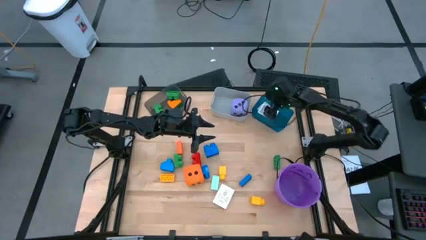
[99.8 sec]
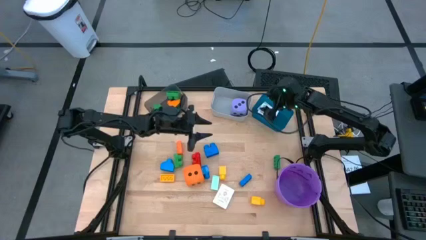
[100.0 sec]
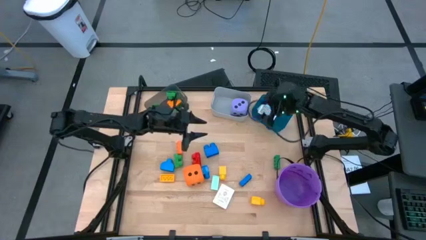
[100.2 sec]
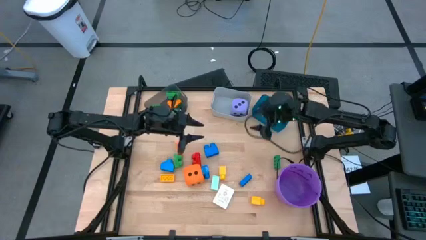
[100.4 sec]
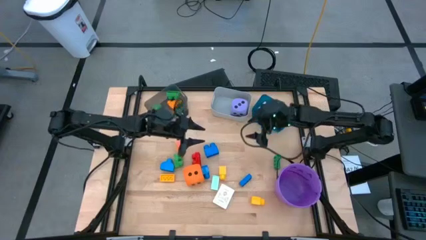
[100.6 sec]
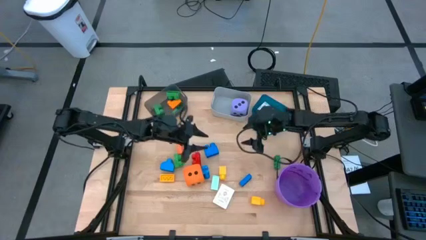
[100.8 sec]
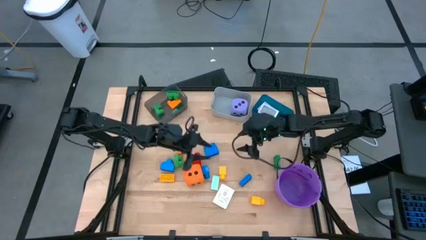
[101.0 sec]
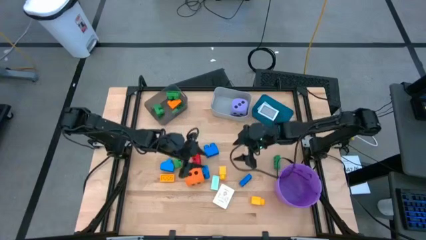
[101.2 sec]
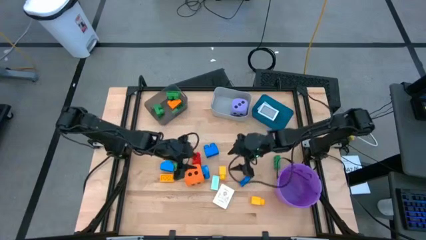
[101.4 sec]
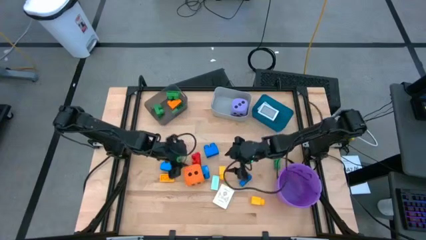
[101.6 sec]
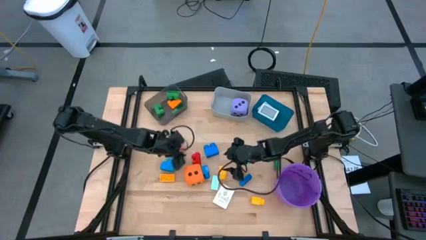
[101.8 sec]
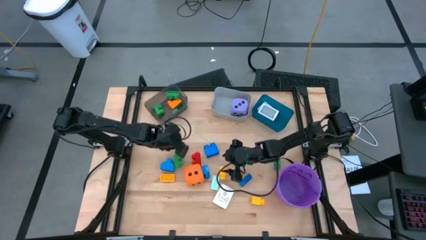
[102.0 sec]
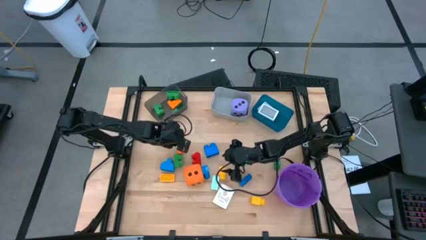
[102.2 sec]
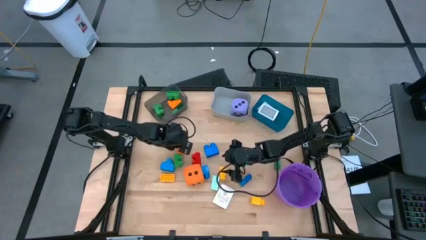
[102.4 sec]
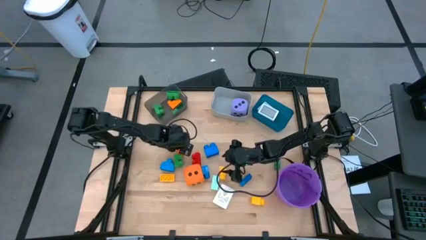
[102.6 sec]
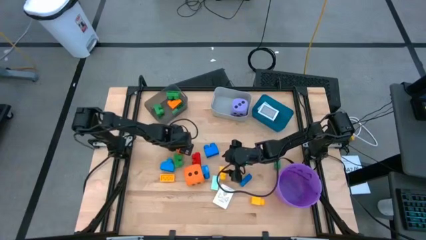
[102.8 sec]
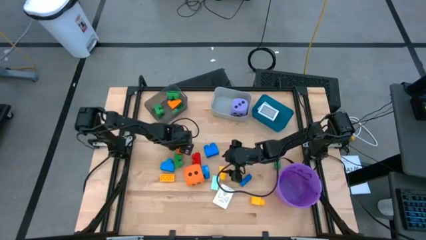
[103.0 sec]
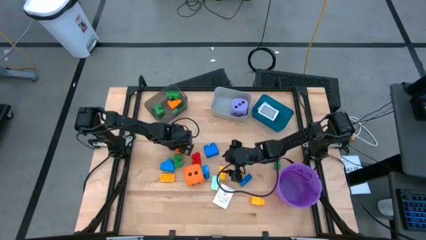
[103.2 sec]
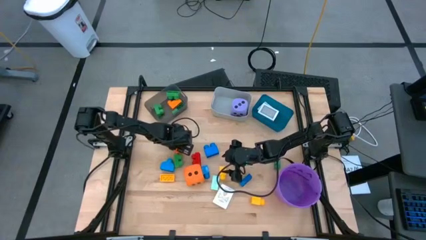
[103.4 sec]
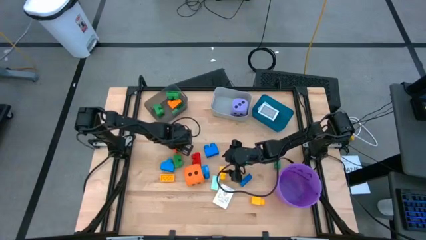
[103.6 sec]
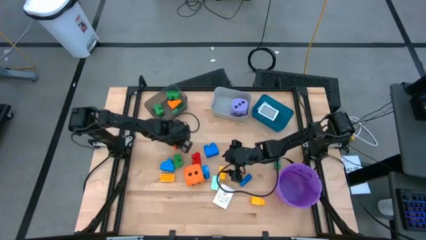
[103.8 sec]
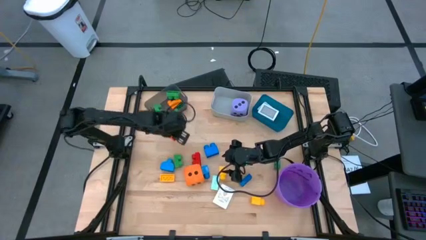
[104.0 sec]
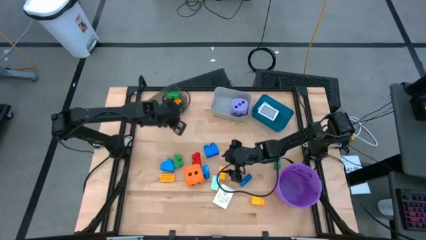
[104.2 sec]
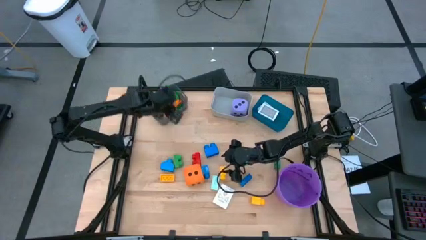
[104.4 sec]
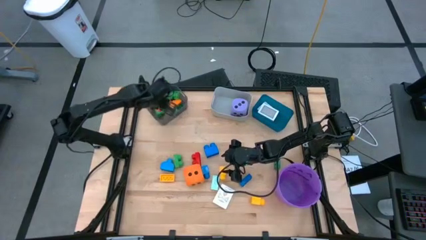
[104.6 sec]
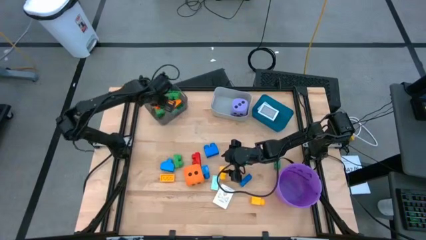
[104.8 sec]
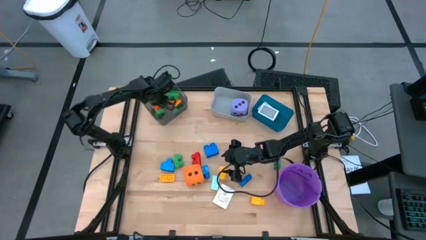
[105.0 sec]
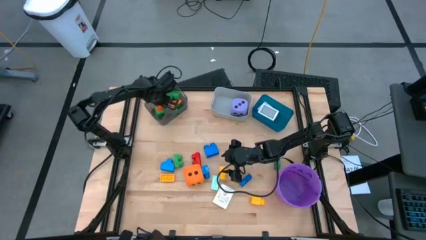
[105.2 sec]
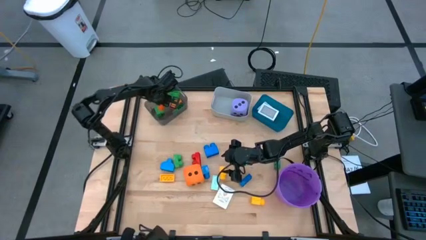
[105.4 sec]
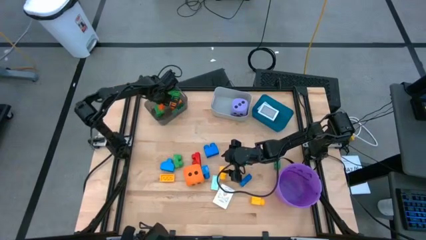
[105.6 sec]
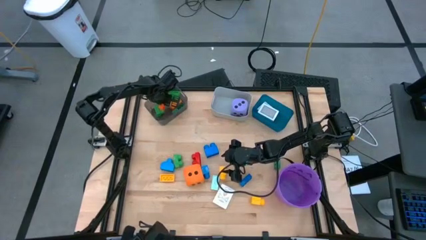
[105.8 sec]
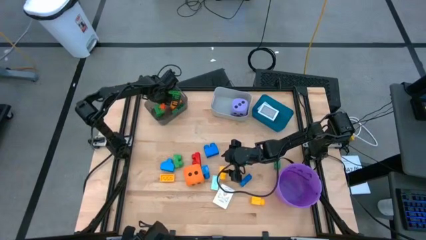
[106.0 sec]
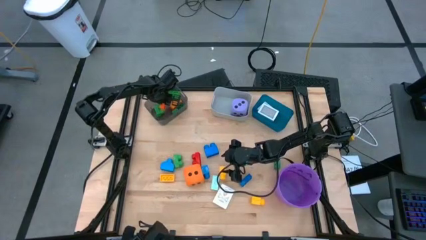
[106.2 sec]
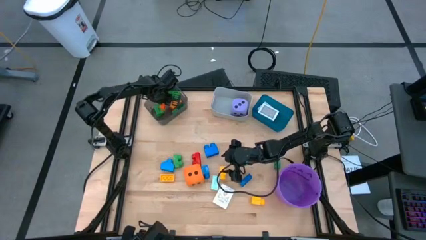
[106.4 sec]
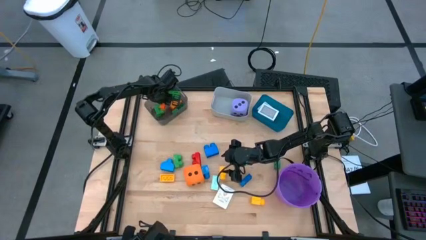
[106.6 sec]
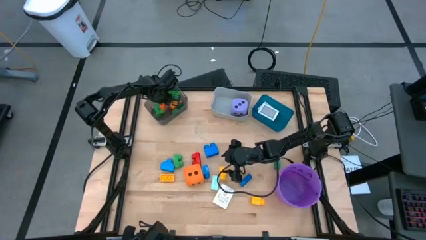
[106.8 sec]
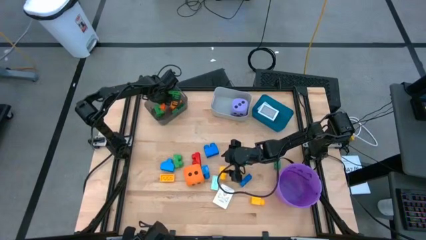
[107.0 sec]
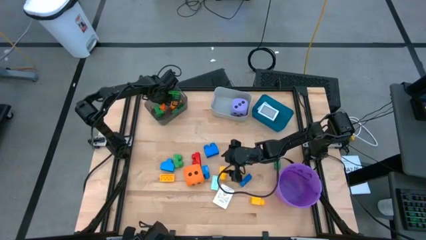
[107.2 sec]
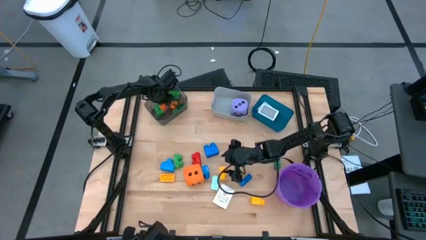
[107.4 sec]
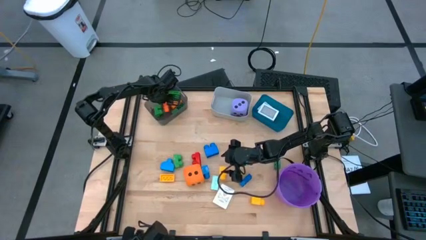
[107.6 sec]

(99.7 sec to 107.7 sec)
Task: Pick & Place Toys
Put the orange gamepiece into the black bin

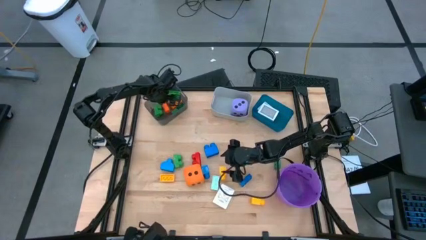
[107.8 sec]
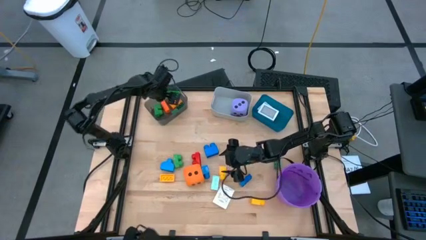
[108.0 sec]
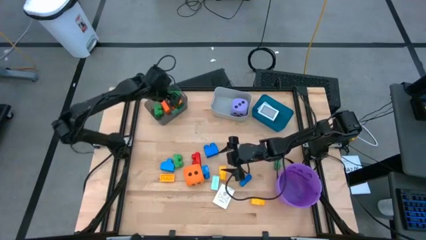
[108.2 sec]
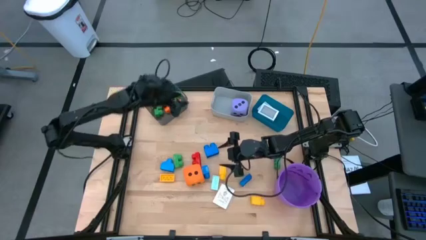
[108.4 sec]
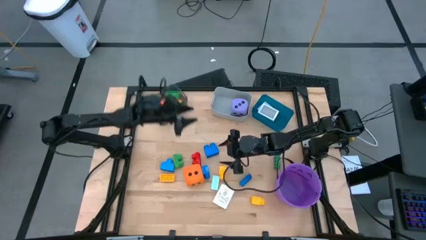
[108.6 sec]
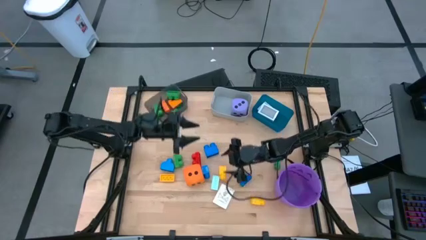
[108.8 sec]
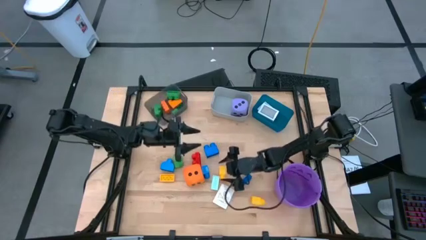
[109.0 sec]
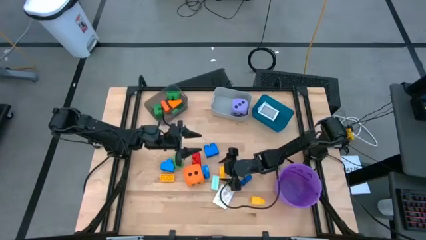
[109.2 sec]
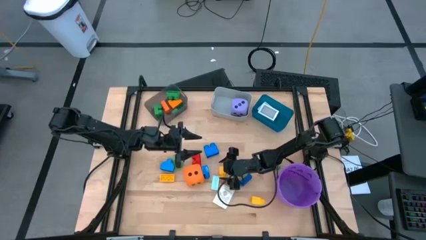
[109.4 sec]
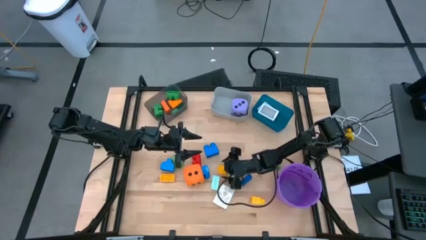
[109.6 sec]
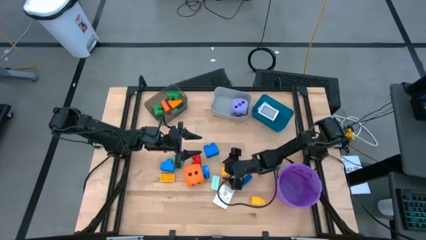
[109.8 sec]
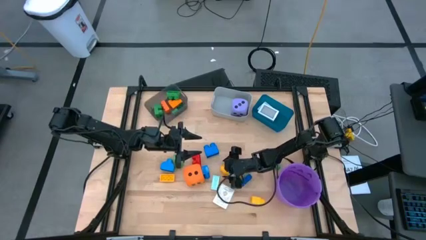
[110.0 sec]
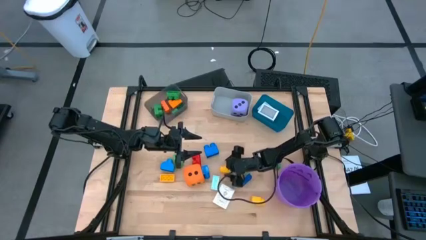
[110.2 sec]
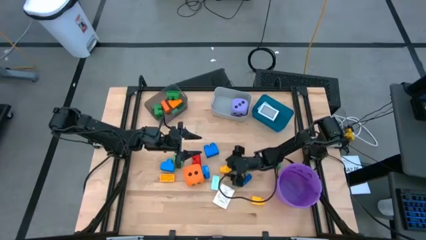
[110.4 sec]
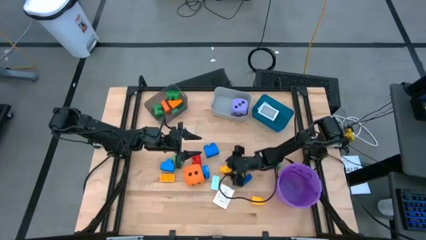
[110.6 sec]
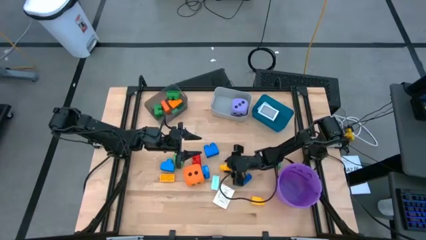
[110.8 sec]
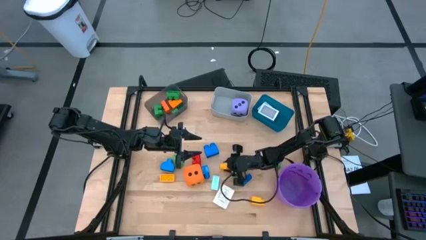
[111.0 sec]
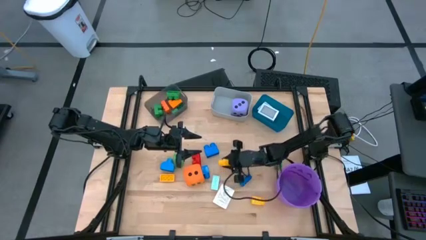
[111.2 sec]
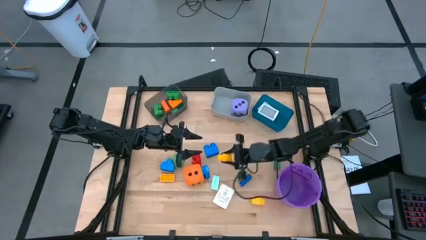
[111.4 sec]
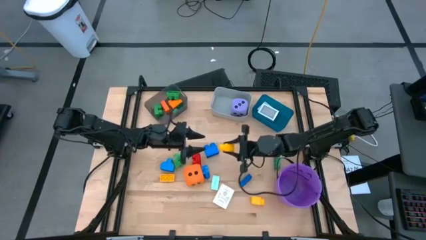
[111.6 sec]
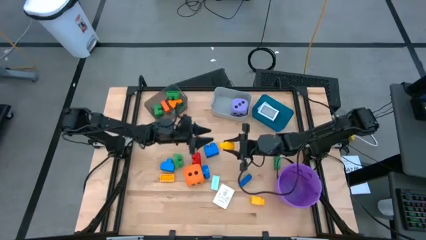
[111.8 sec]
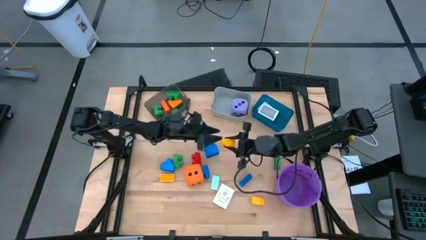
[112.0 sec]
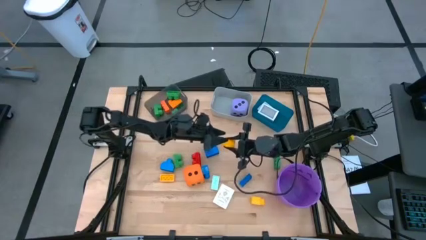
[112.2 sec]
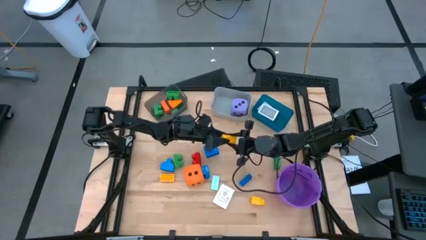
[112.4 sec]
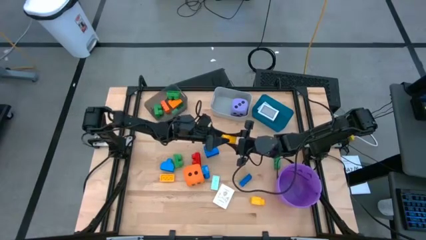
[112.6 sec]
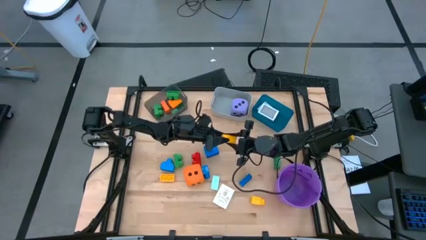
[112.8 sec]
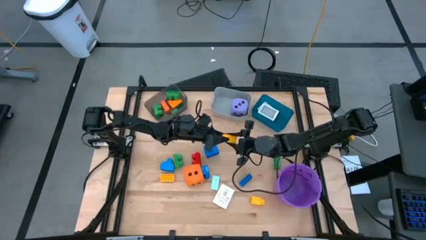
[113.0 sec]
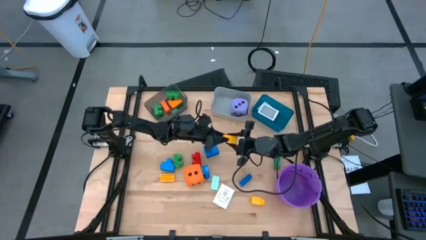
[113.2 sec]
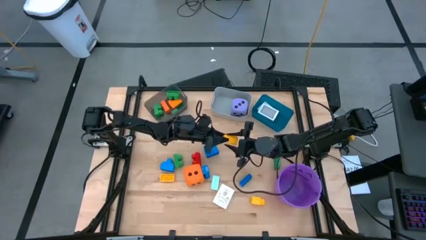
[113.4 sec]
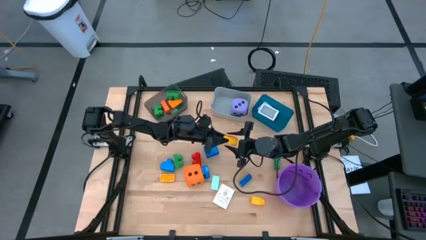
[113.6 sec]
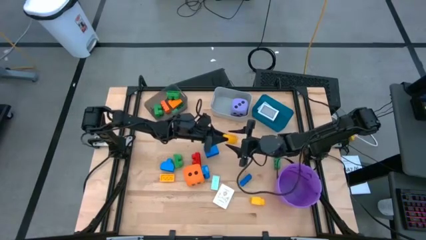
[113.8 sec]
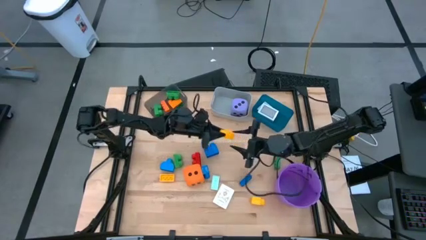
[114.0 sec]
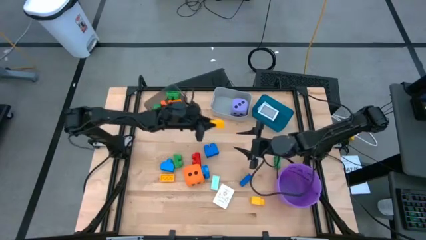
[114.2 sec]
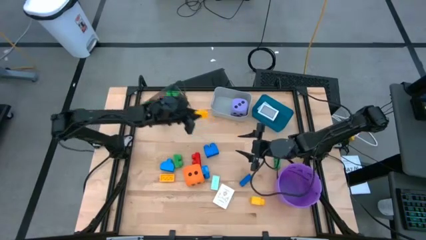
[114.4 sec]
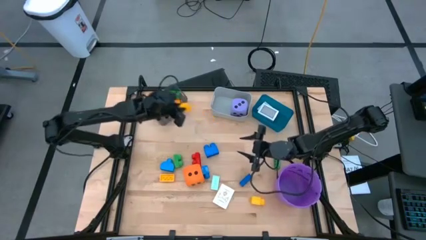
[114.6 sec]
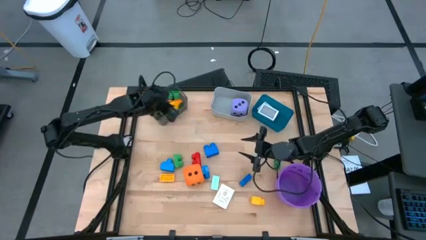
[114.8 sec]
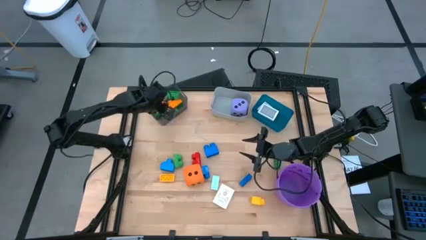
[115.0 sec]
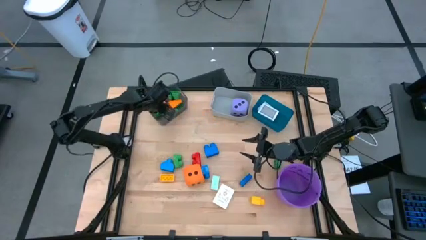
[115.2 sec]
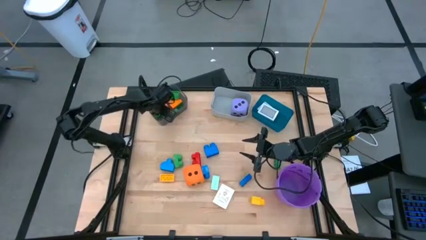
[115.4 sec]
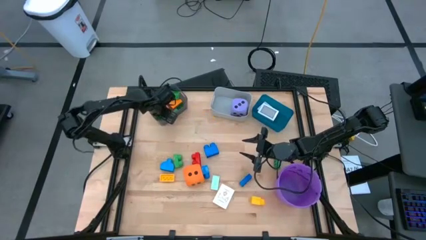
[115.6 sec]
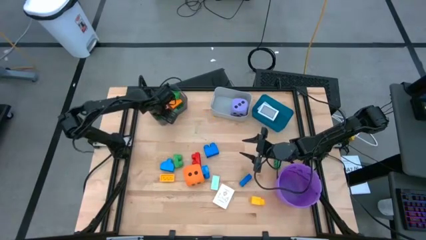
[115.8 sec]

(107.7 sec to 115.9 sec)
Put the yellow gamepiece into the black bin
